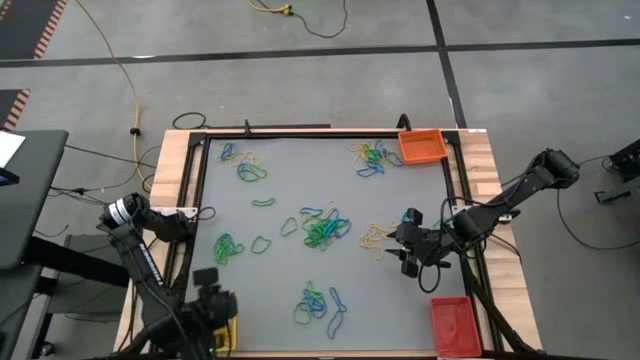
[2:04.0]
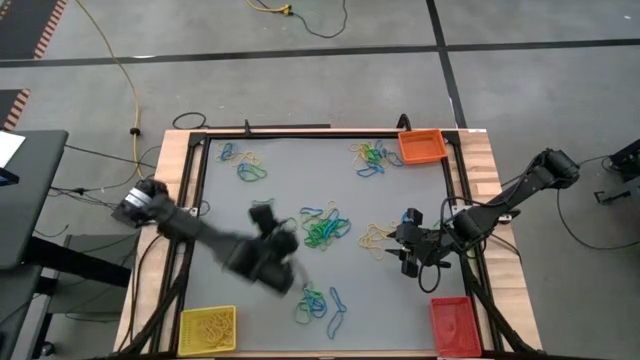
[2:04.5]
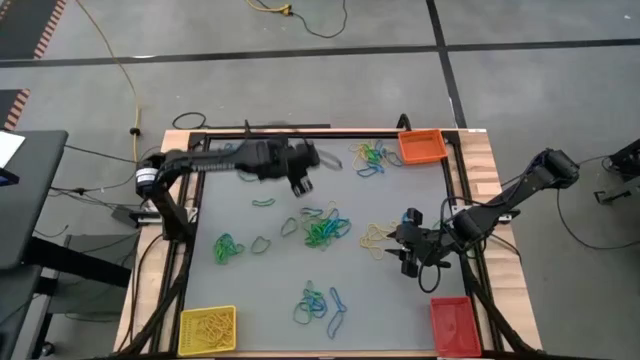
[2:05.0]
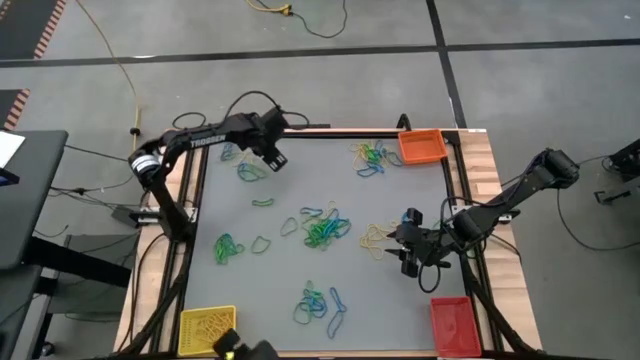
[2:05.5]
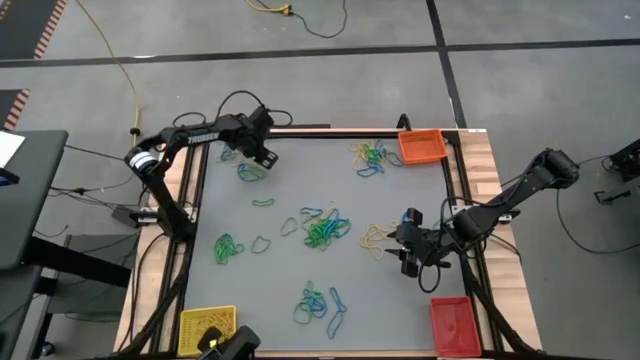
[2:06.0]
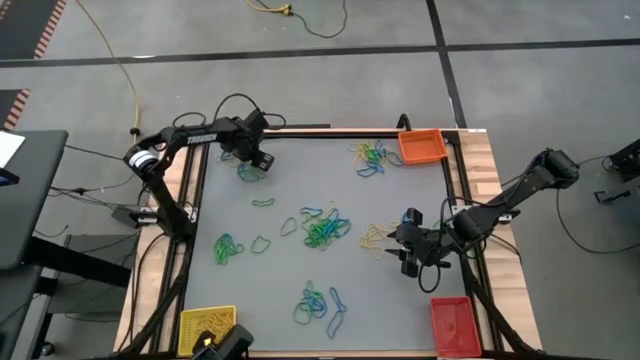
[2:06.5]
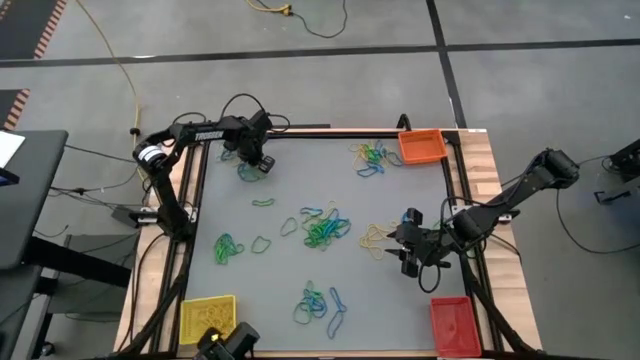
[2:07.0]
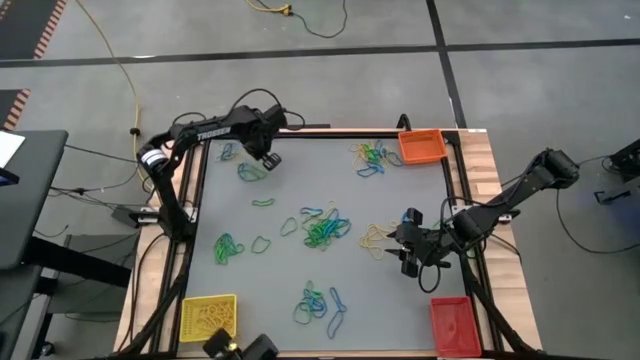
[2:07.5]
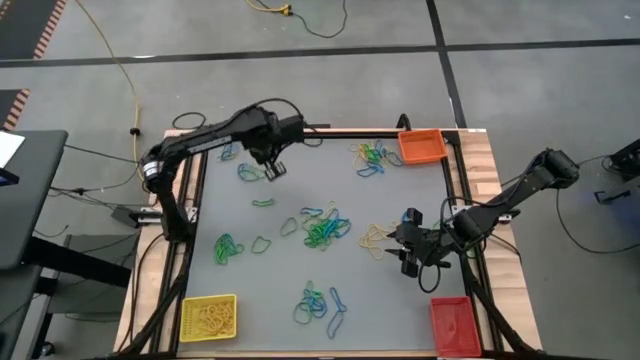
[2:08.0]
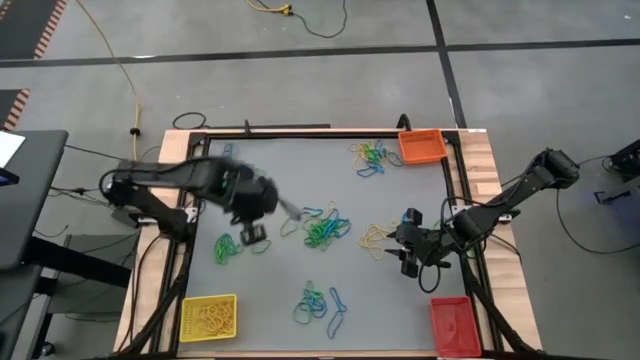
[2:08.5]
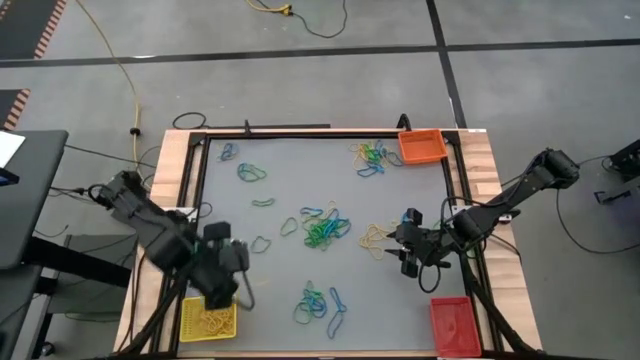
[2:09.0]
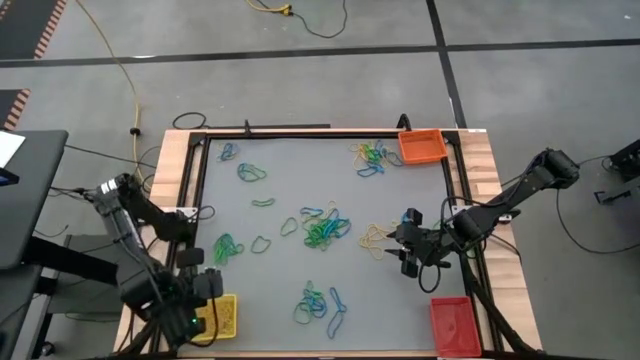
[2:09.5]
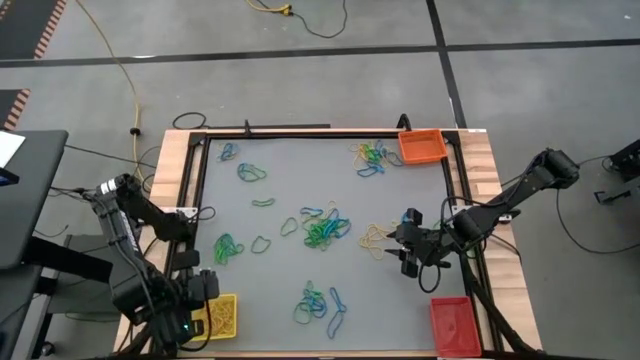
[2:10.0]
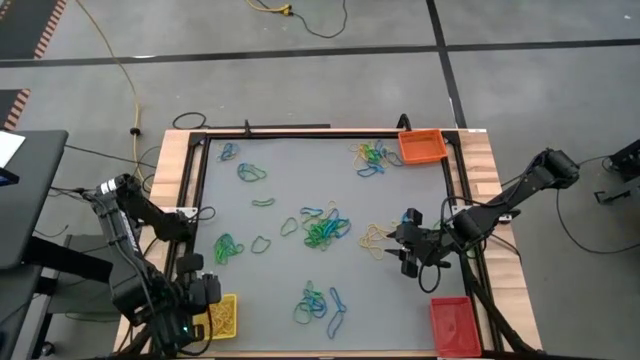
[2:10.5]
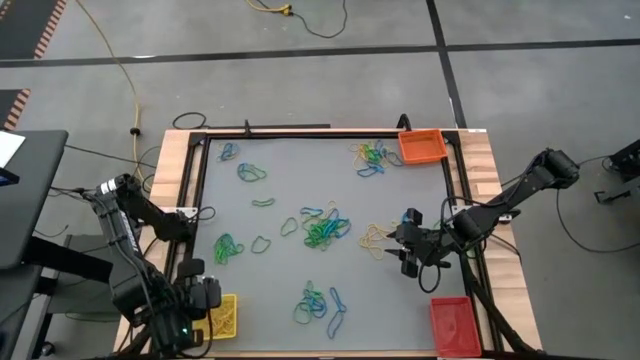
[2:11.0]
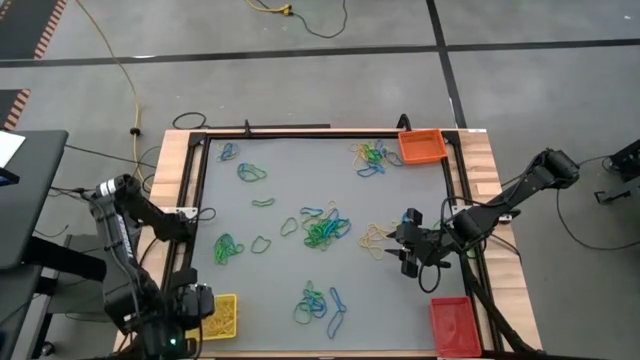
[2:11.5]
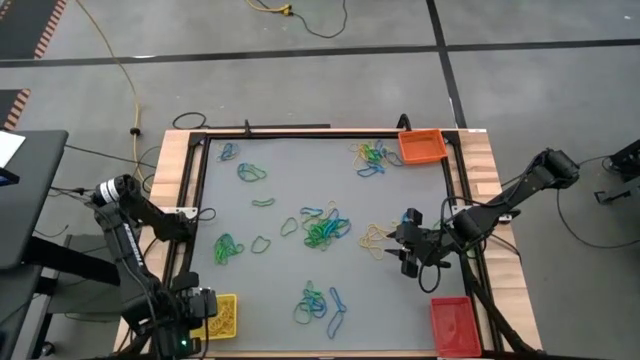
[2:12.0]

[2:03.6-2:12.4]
Task: Sort rubber bands into baskets
Put the yellow rubber band into the yellow bin

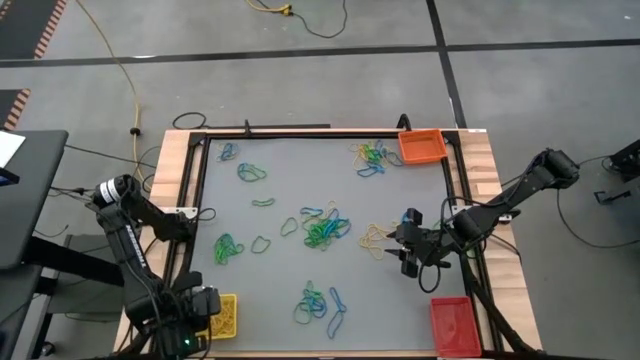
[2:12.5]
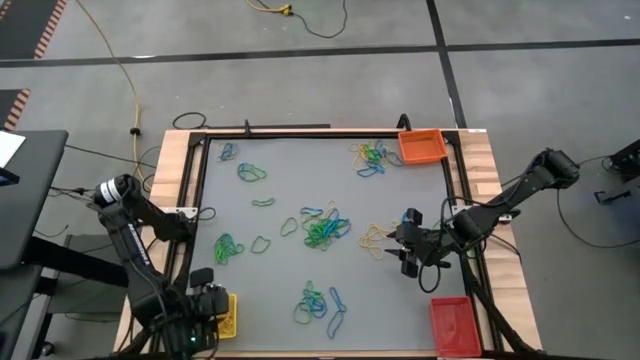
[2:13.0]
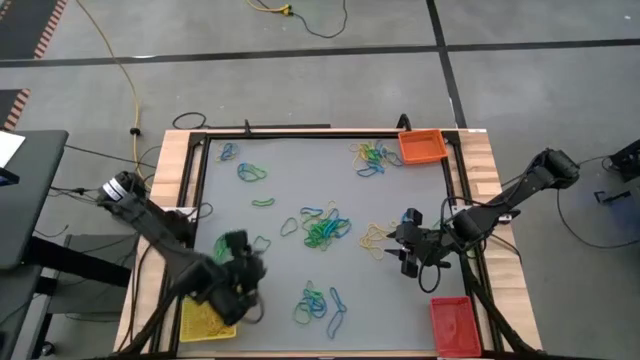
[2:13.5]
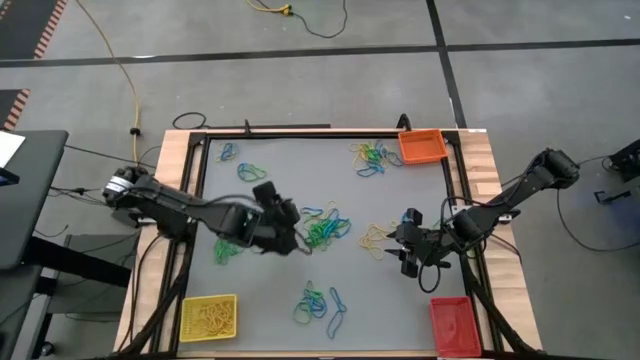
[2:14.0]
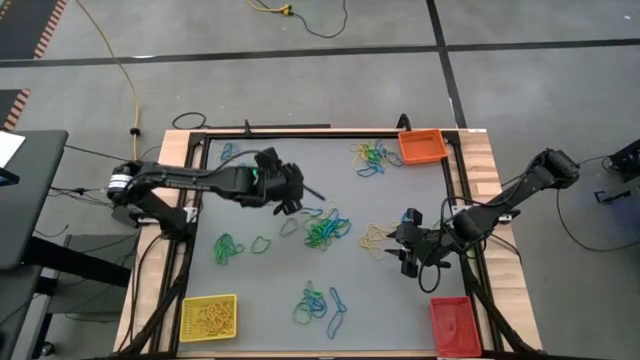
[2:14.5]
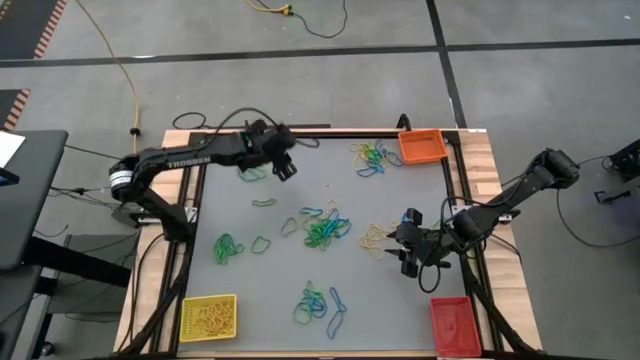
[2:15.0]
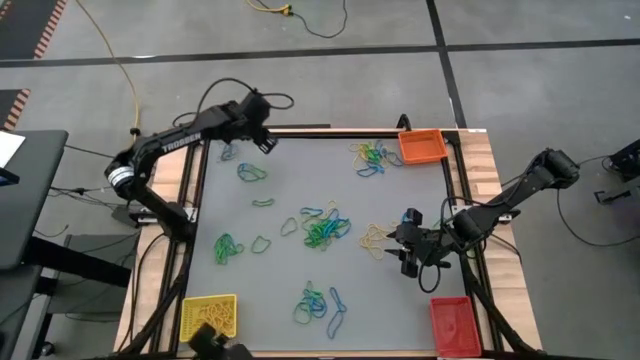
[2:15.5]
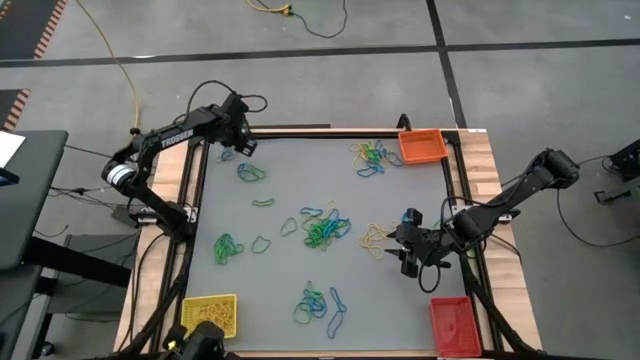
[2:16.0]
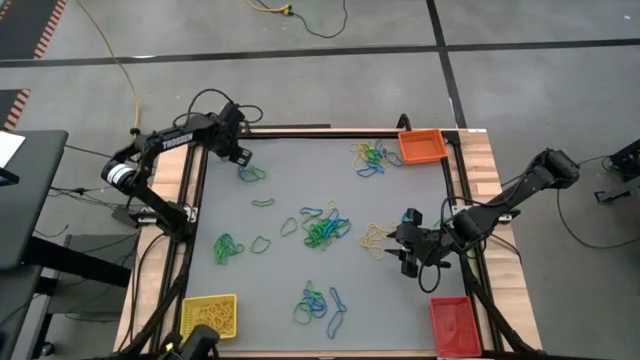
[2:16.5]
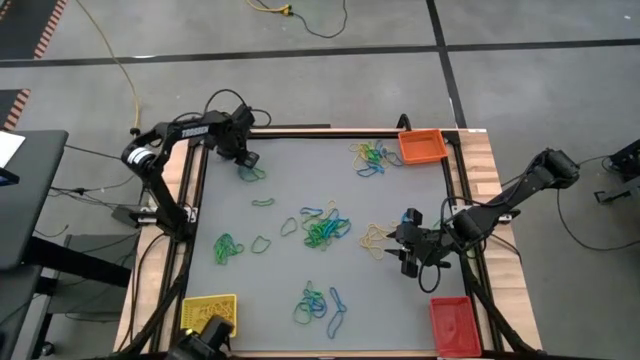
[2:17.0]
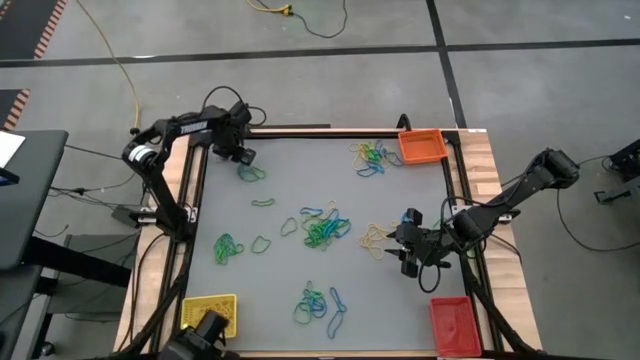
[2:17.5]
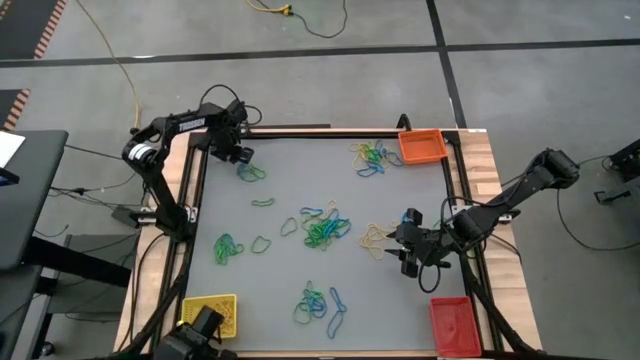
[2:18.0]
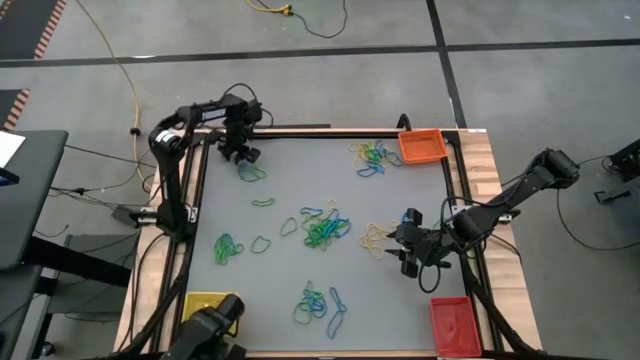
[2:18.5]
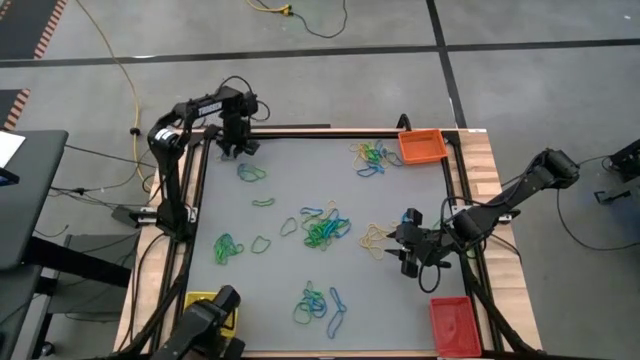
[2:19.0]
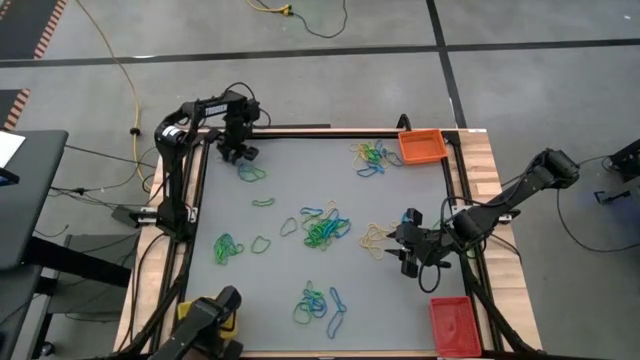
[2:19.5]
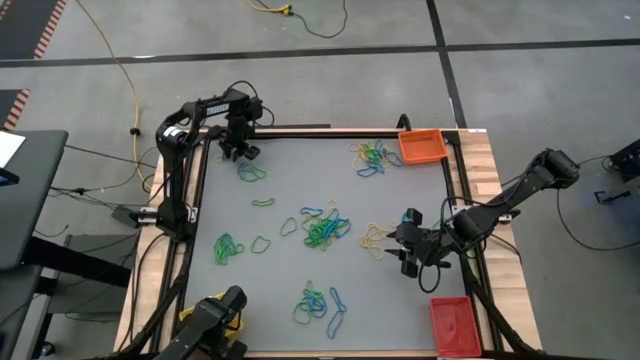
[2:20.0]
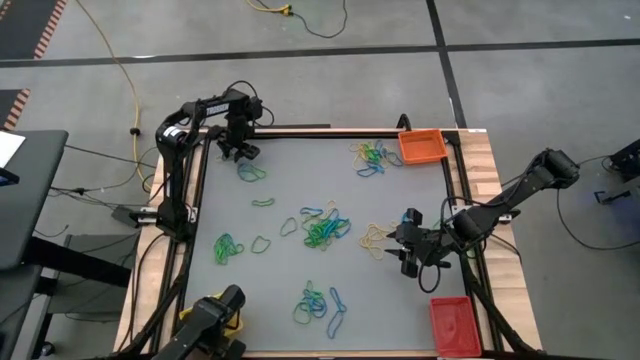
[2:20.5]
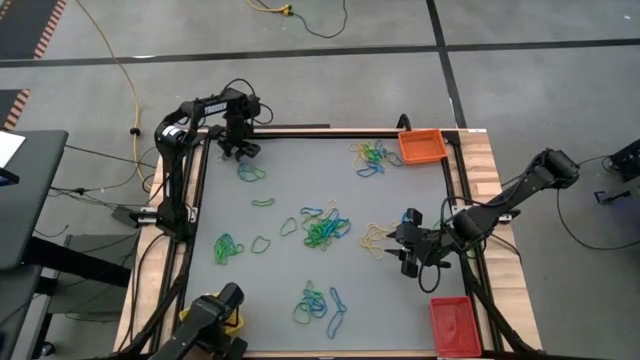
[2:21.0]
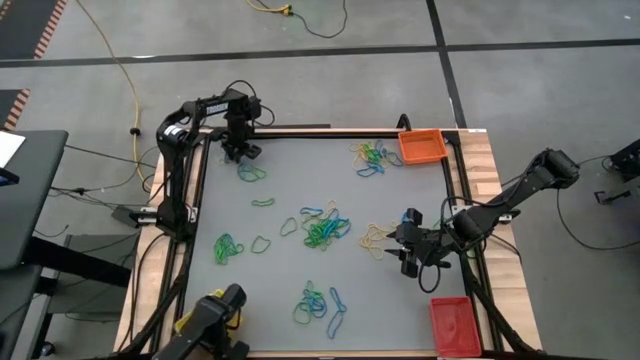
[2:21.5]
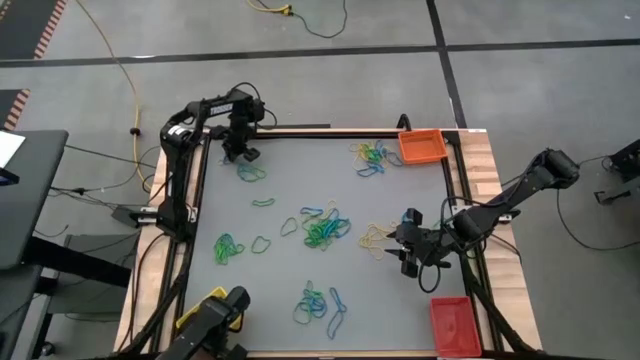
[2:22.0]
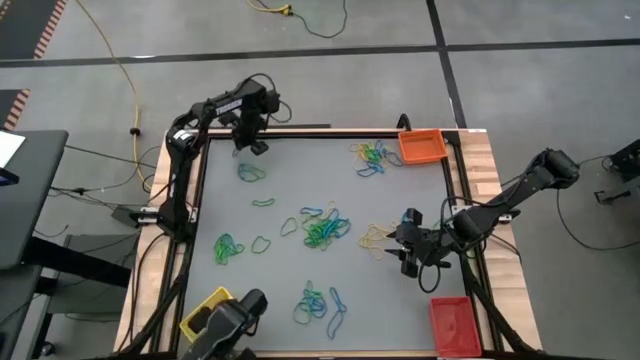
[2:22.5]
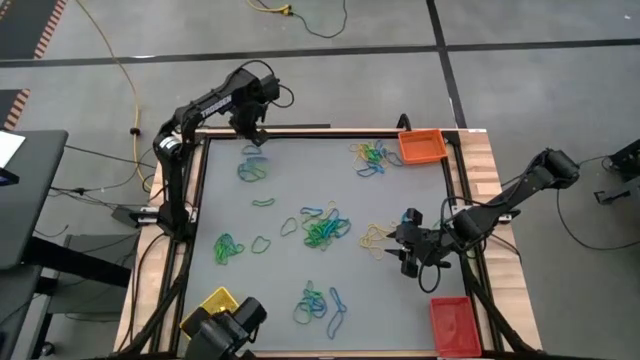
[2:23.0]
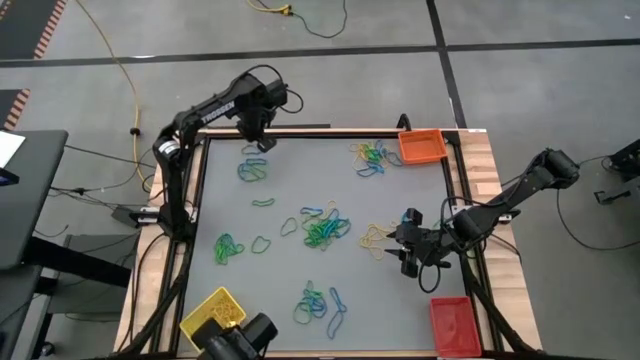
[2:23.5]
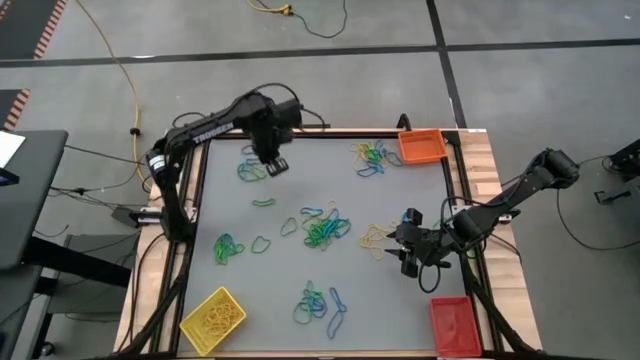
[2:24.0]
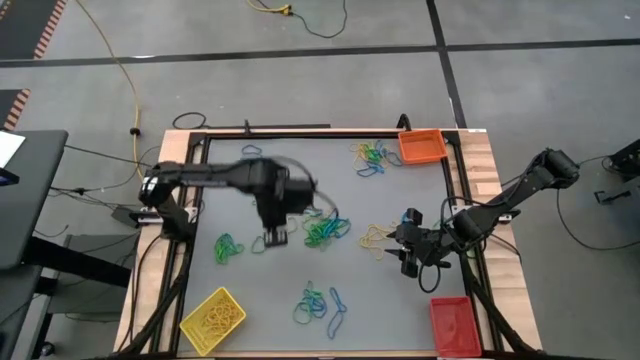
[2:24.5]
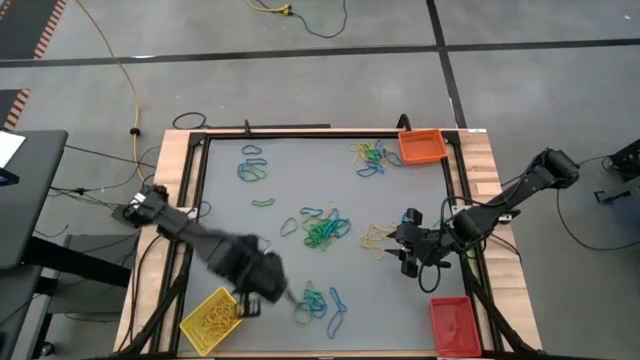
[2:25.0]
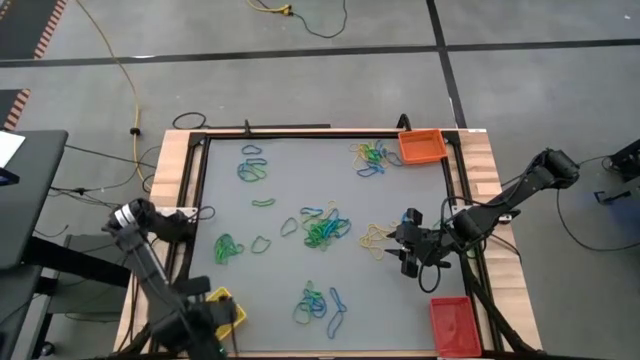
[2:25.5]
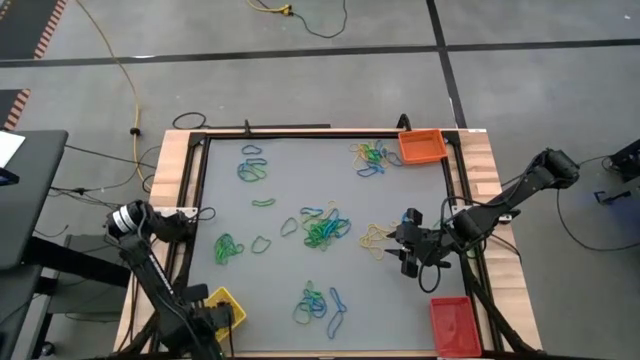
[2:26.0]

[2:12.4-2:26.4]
Put the yellow rubber band into the yellow bin
